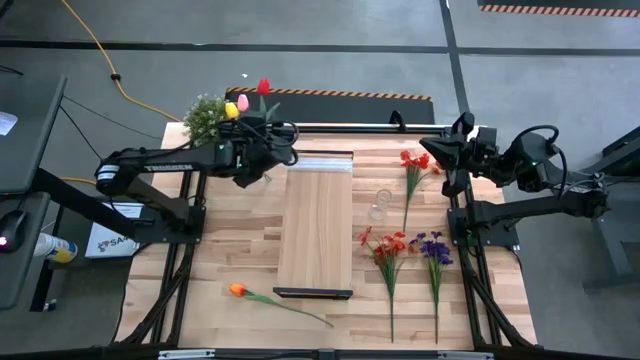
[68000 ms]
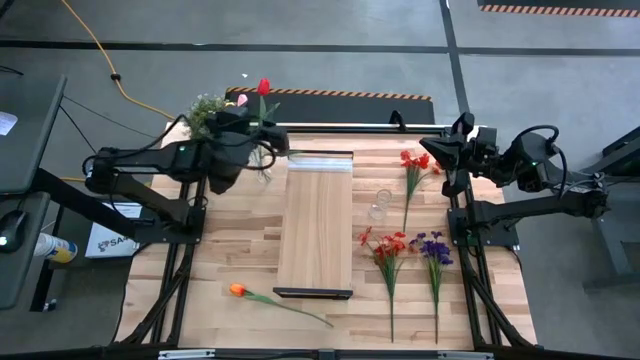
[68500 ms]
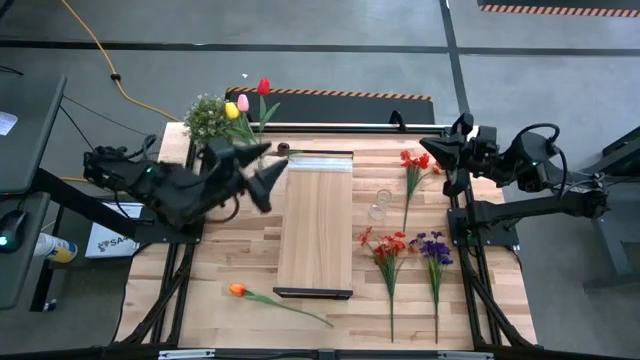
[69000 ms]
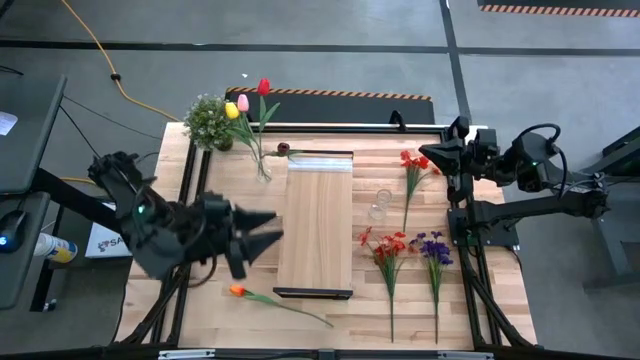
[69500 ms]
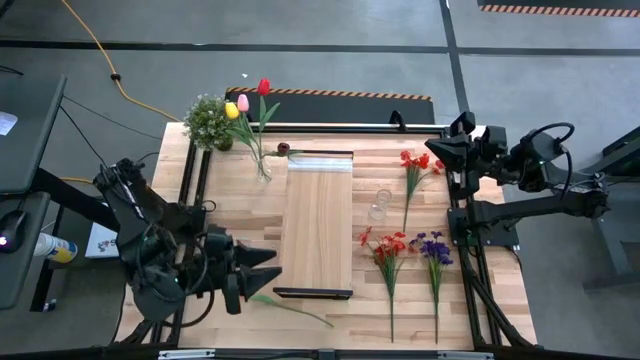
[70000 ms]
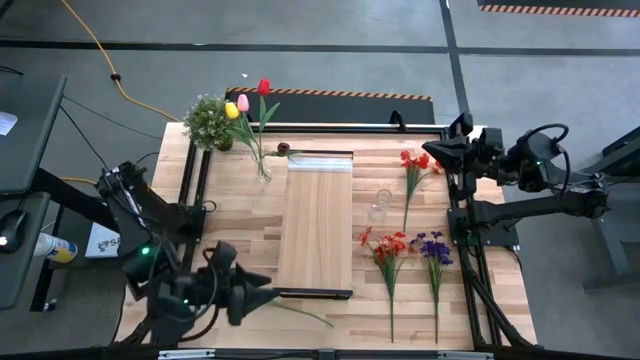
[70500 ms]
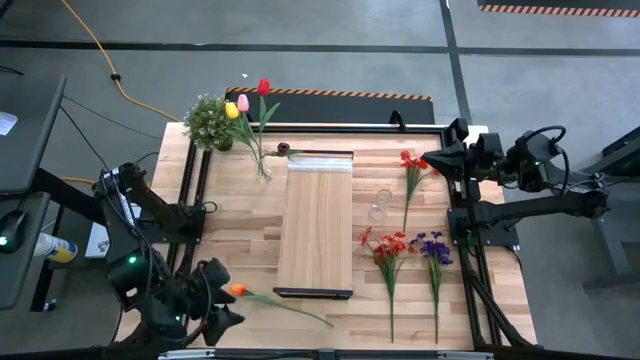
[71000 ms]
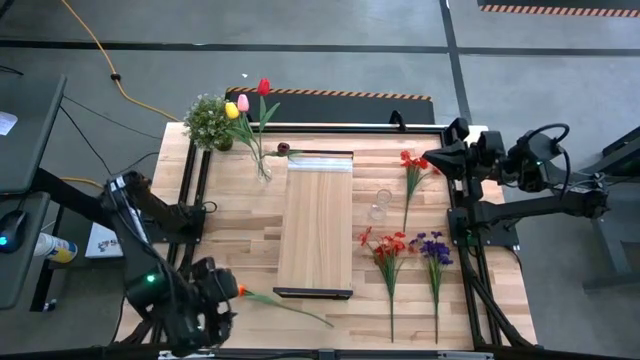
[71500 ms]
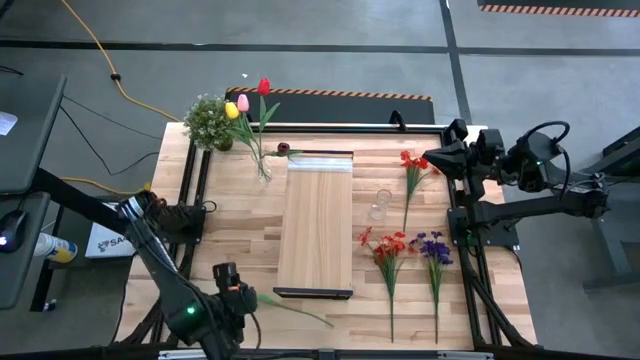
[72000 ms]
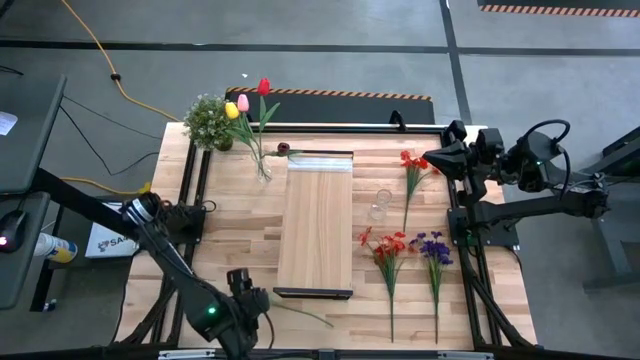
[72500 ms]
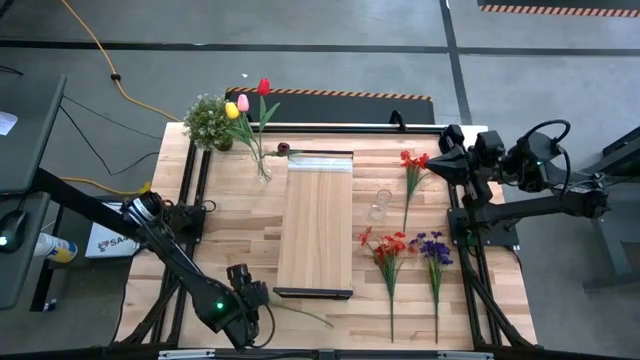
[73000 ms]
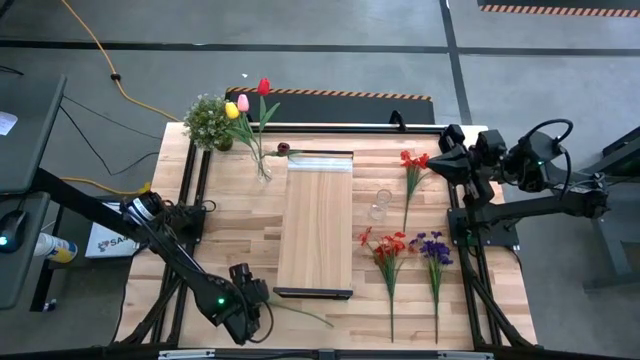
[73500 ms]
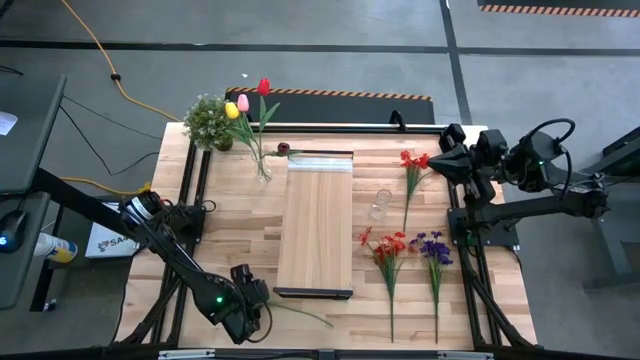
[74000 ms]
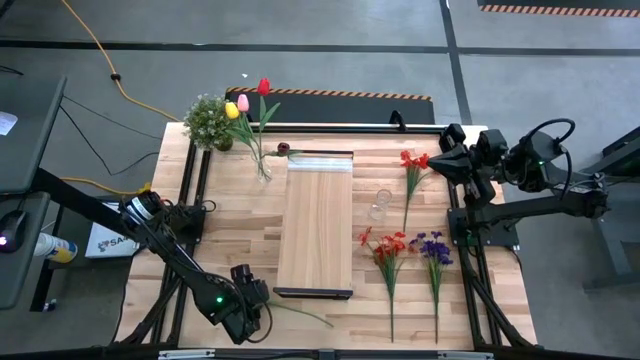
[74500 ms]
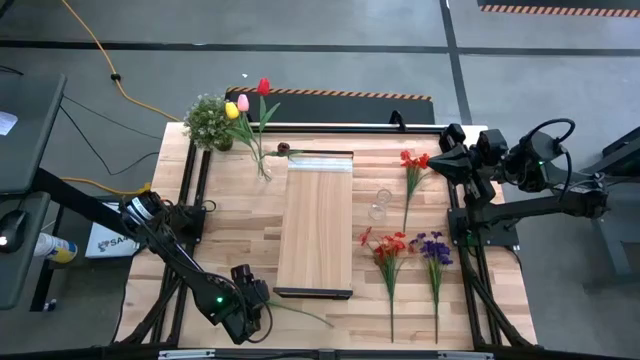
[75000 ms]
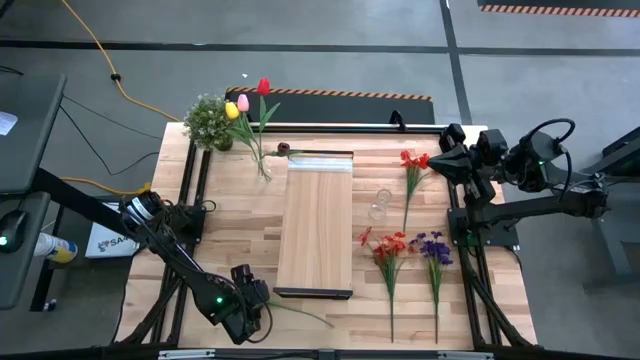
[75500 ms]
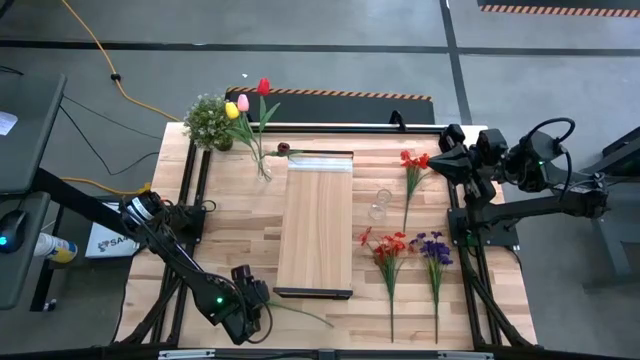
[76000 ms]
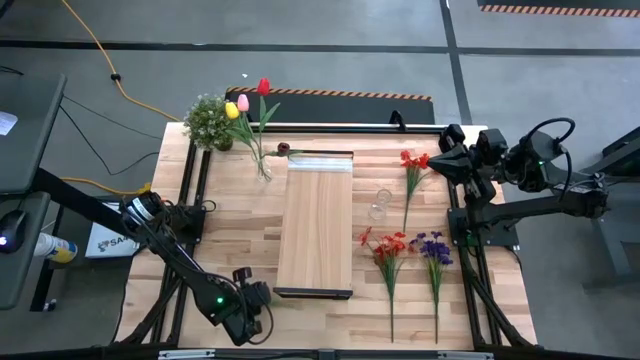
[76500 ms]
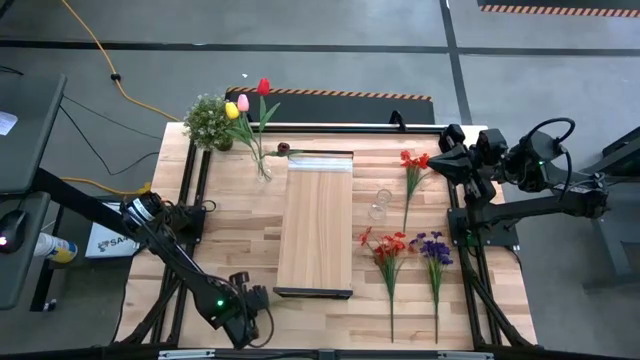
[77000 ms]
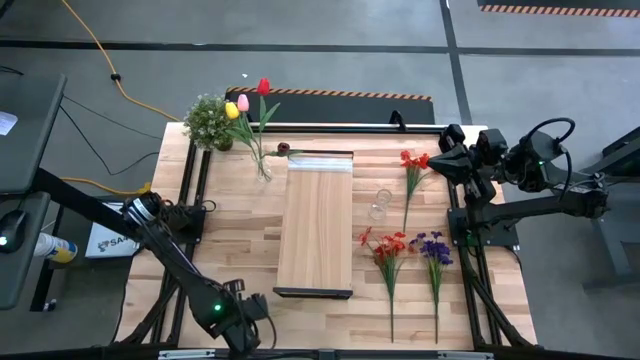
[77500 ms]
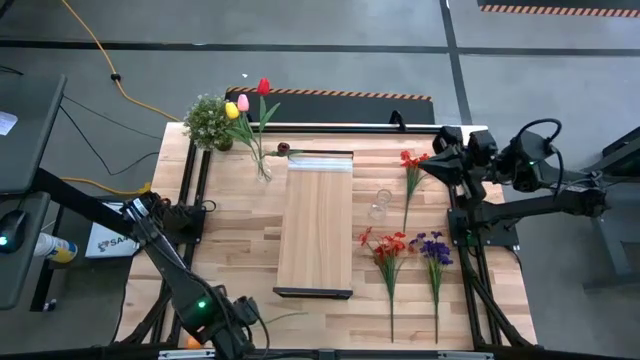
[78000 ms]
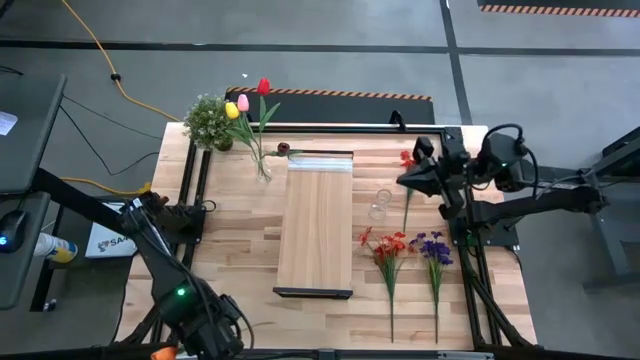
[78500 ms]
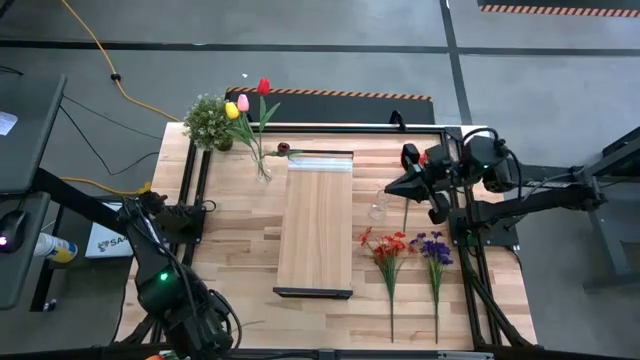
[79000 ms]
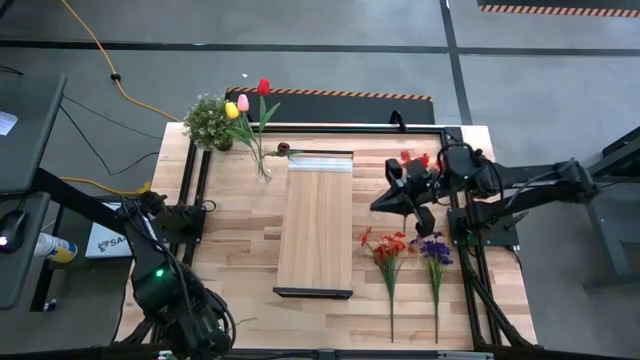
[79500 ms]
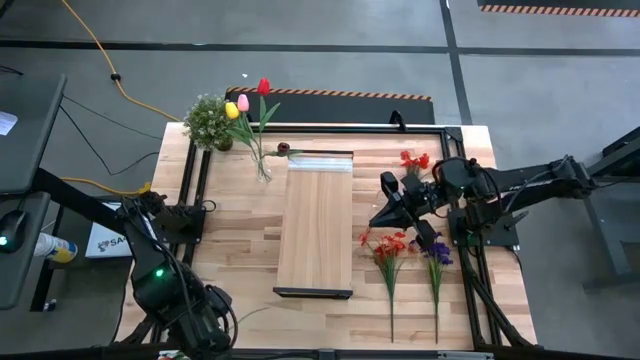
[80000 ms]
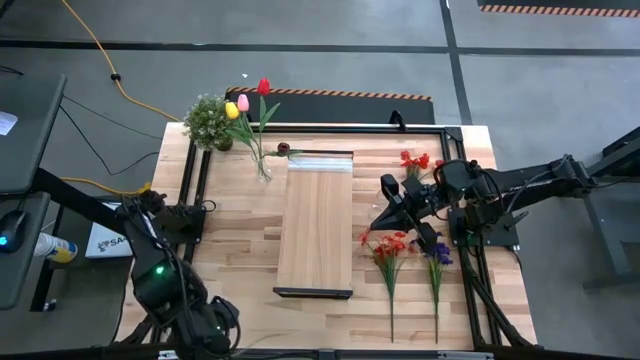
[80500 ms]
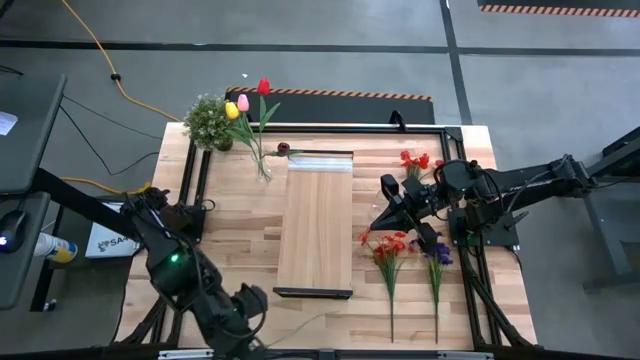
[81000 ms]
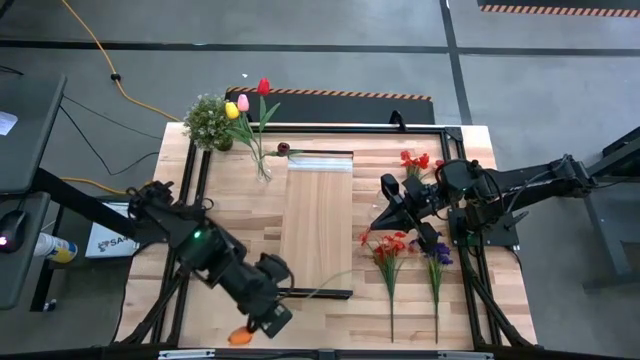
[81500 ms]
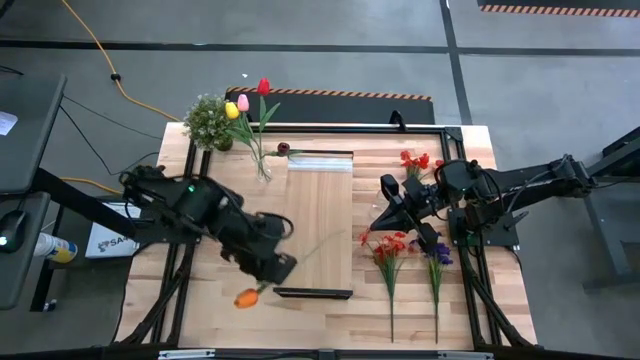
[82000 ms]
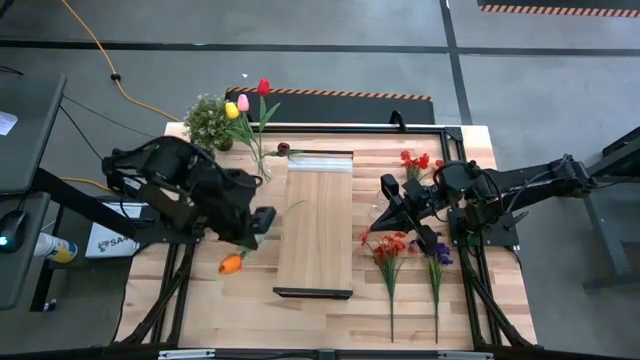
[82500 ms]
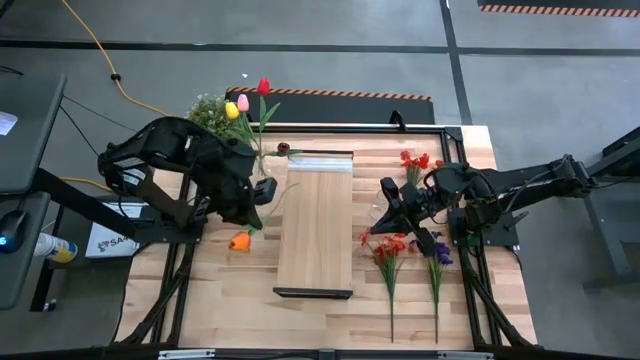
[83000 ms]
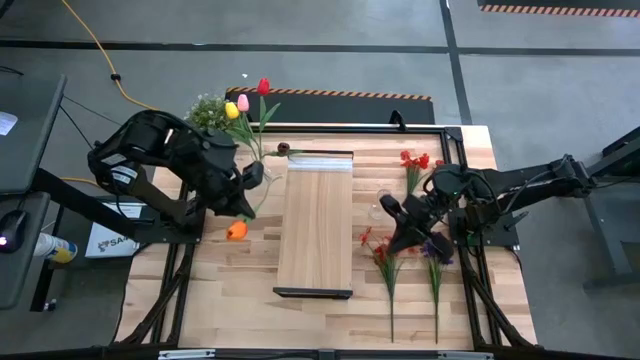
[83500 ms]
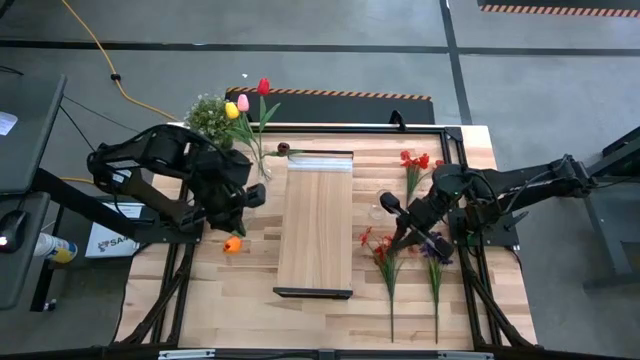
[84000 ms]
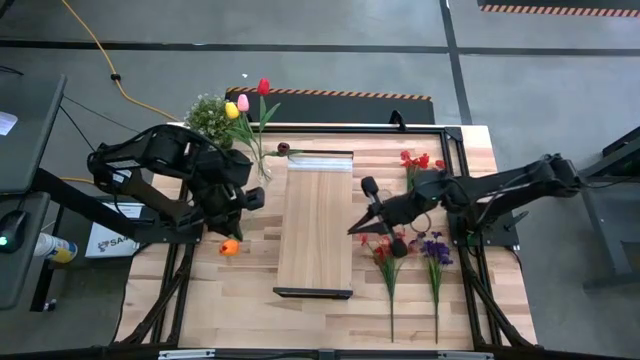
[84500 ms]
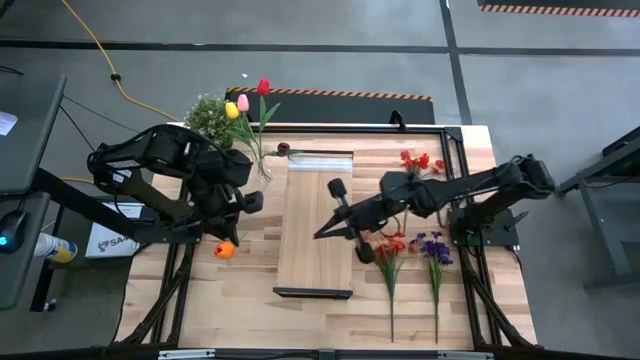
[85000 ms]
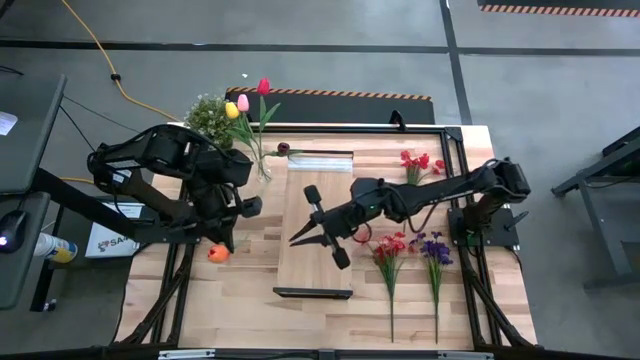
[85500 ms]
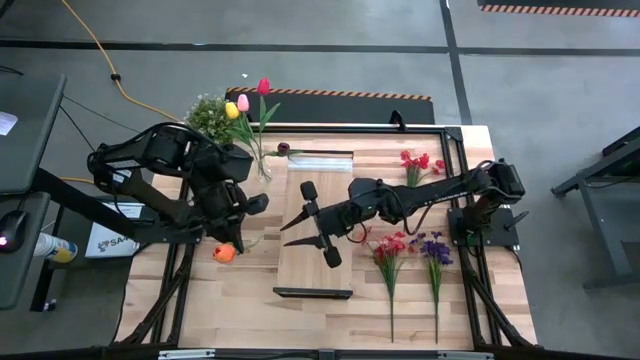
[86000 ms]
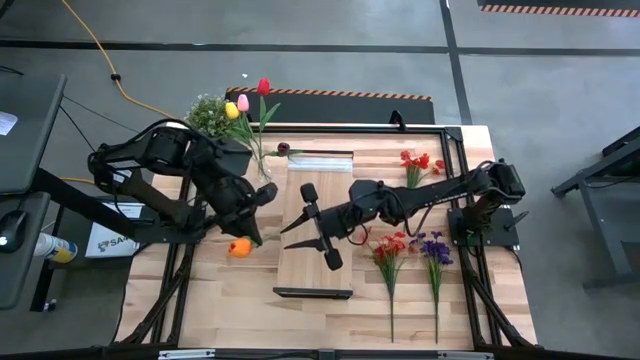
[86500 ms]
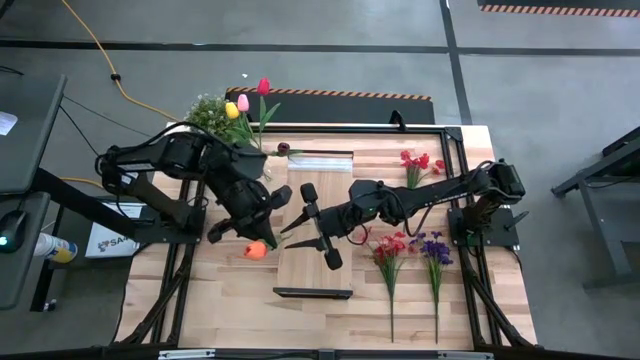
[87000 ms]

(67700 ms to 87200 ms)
Task: Pick and place flowers into a vace then onto a shelf
Put the orange flower into the left vase

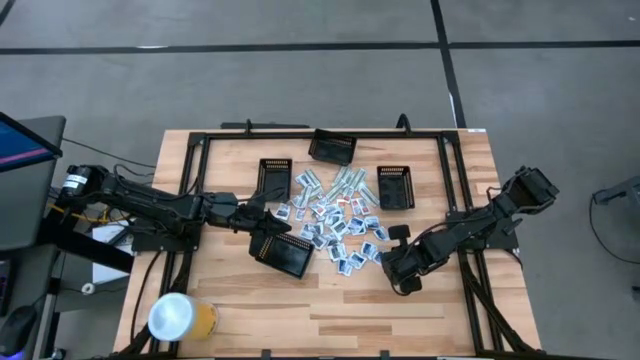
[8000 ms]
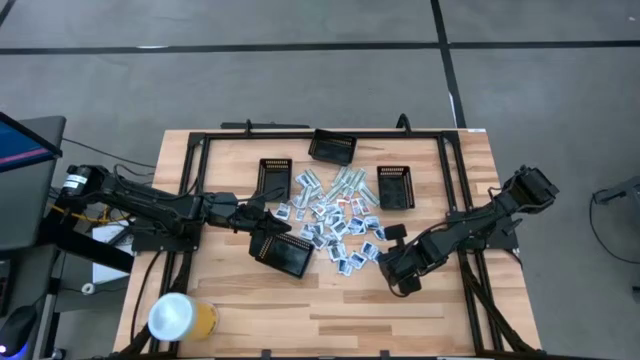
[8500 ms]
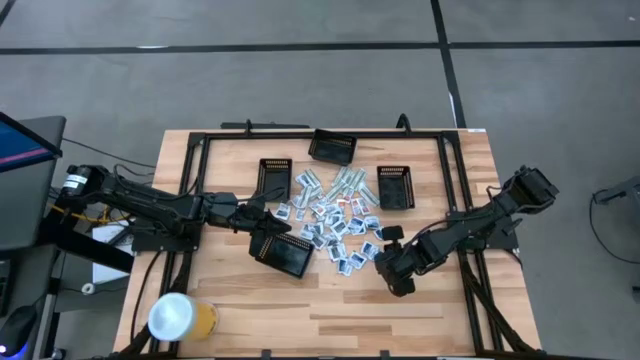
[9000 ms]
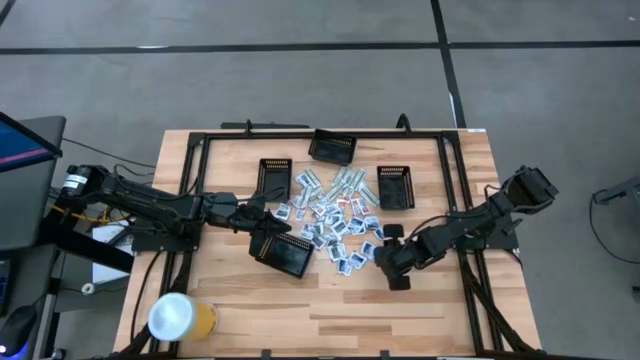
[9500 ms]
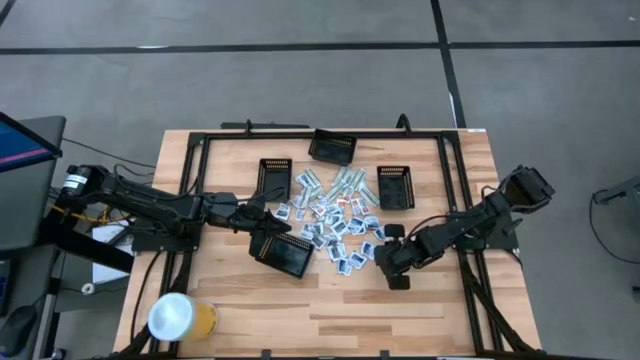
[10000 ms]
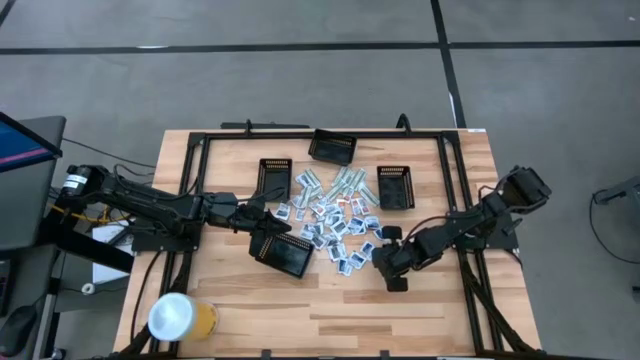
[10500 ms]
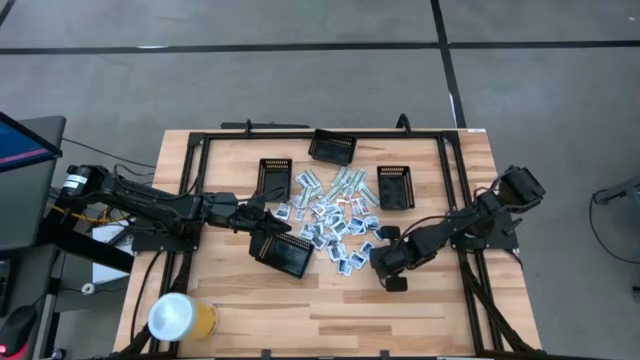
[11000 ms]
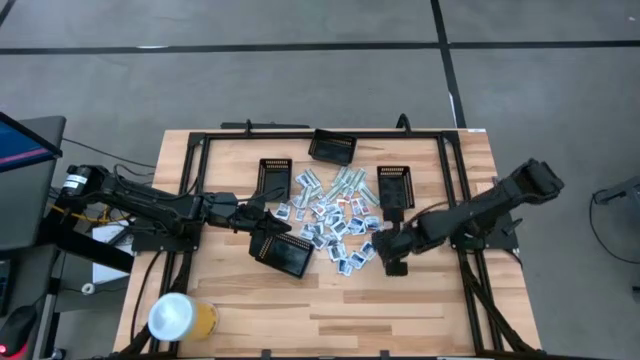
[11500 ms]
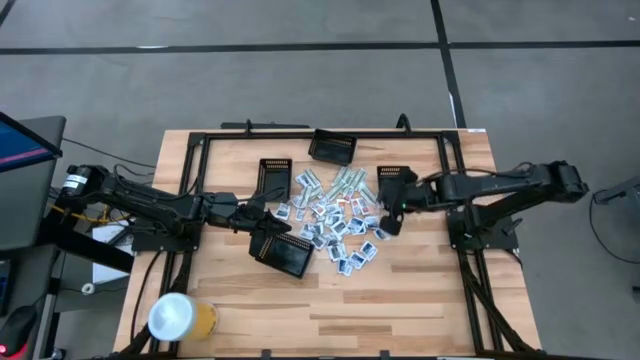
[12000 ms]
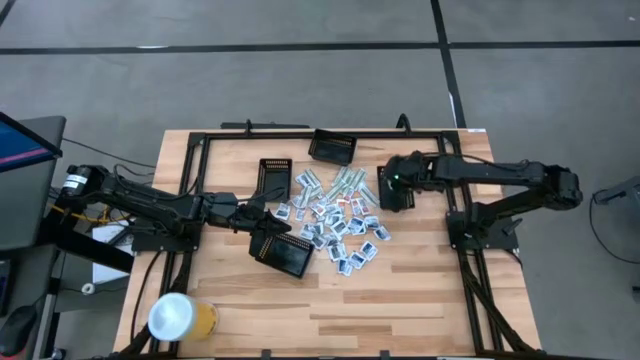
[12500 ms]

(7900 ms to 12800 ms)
Task: Pick & Place First Aid Supplies
Put the white alcohol pad into the right black bin
